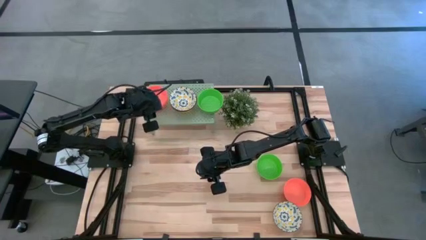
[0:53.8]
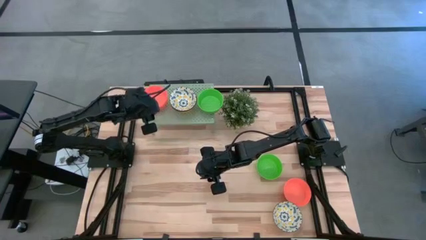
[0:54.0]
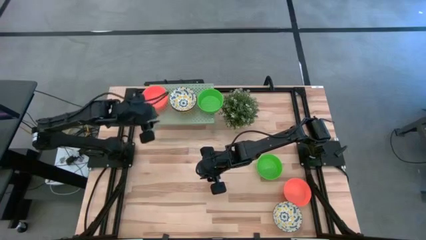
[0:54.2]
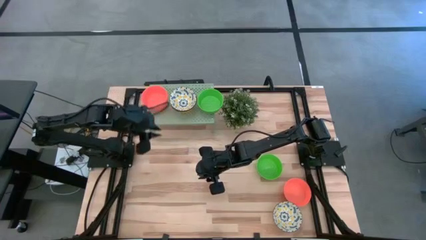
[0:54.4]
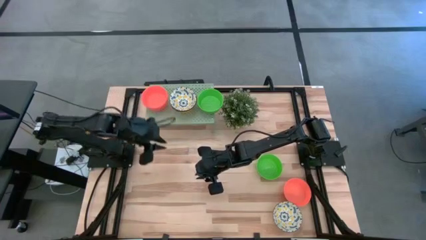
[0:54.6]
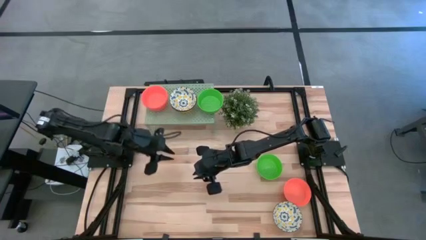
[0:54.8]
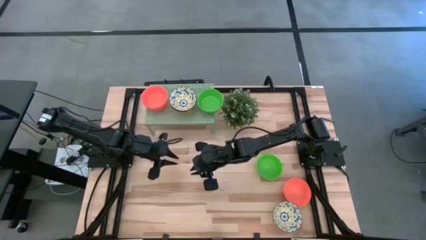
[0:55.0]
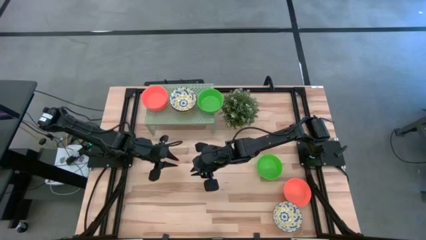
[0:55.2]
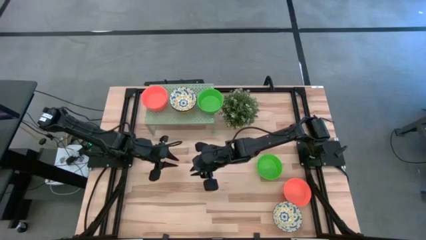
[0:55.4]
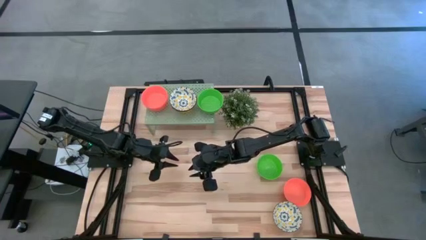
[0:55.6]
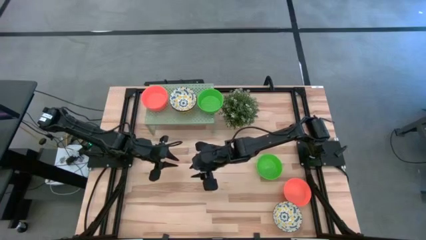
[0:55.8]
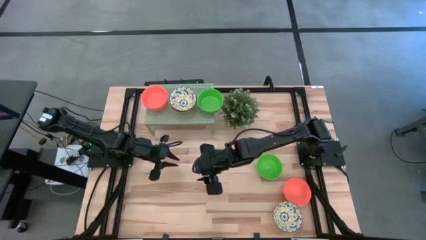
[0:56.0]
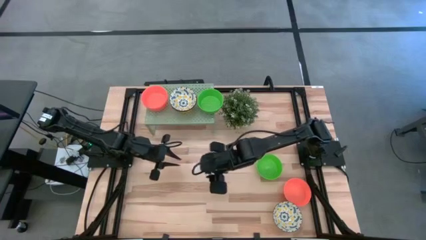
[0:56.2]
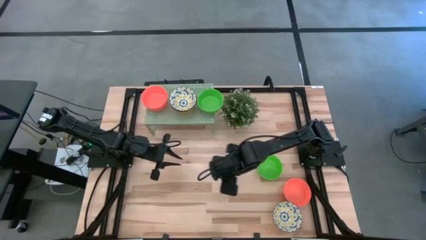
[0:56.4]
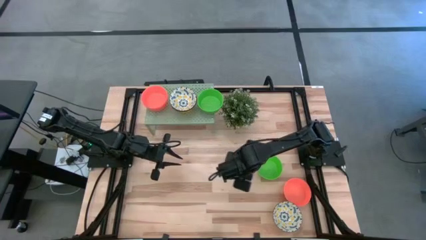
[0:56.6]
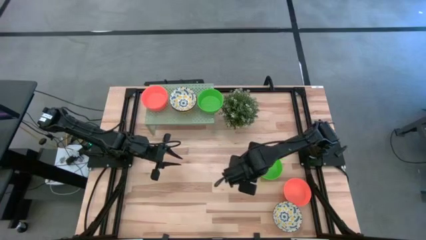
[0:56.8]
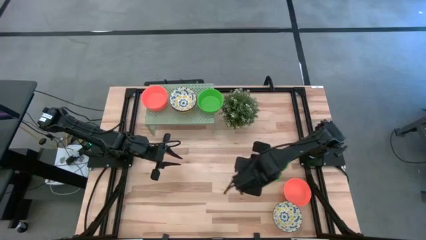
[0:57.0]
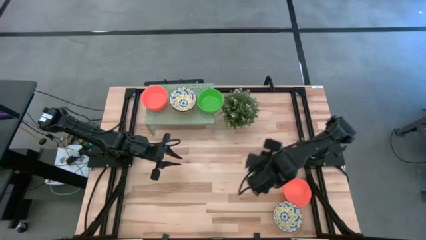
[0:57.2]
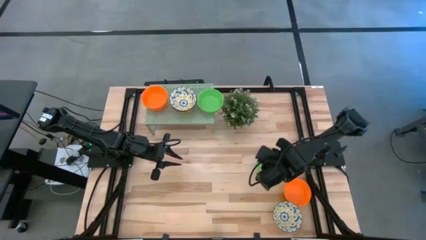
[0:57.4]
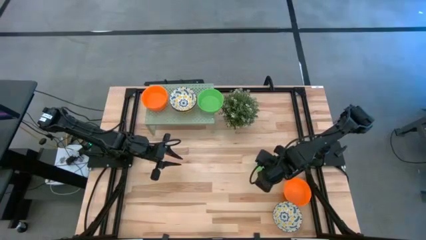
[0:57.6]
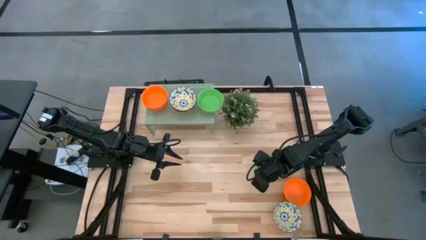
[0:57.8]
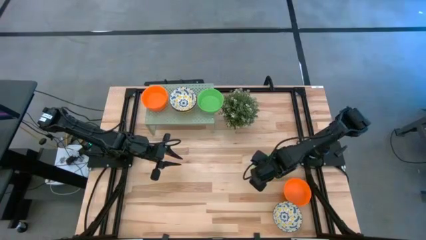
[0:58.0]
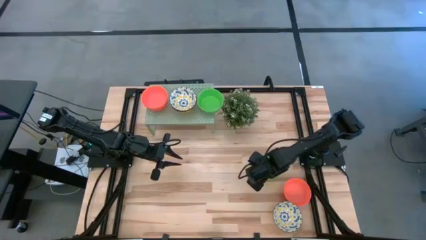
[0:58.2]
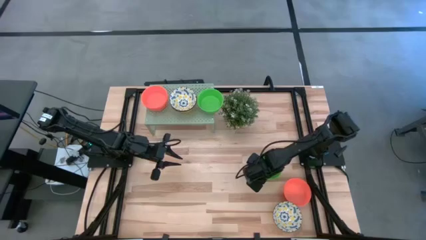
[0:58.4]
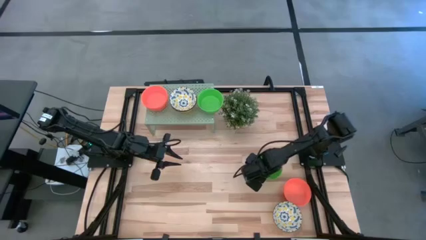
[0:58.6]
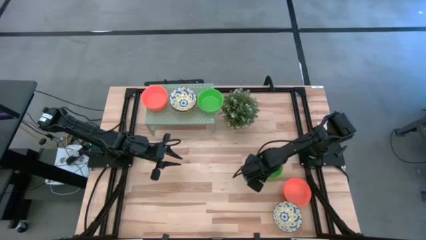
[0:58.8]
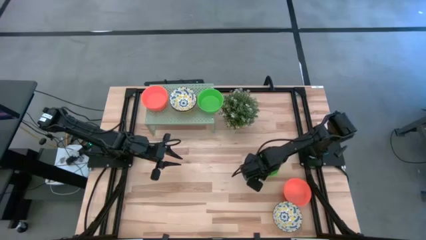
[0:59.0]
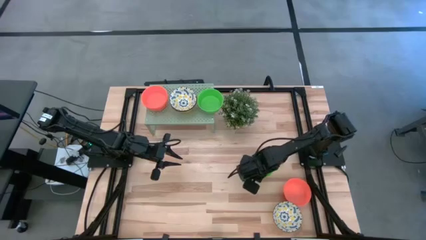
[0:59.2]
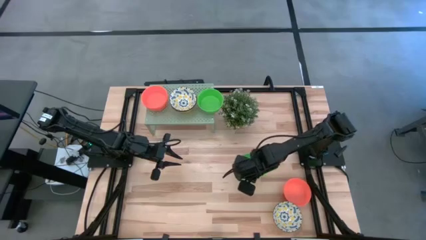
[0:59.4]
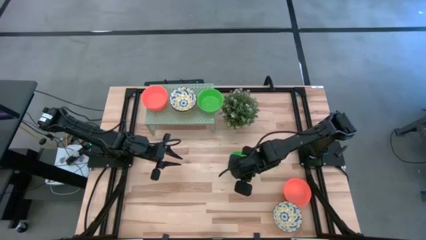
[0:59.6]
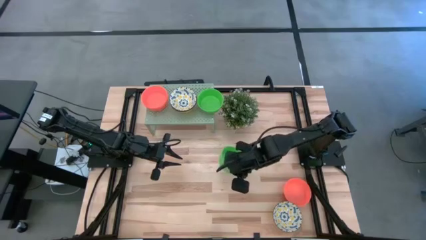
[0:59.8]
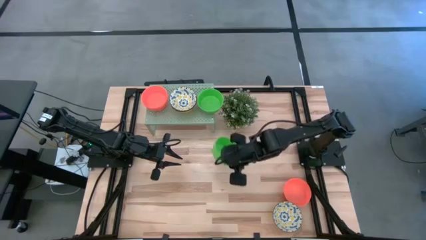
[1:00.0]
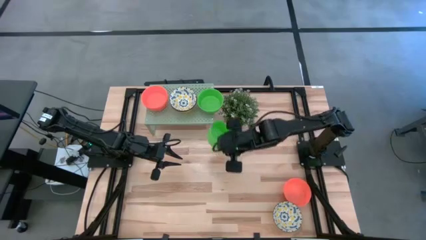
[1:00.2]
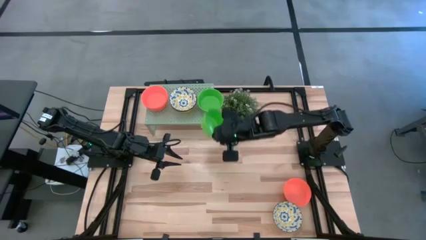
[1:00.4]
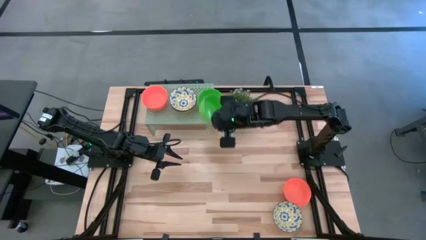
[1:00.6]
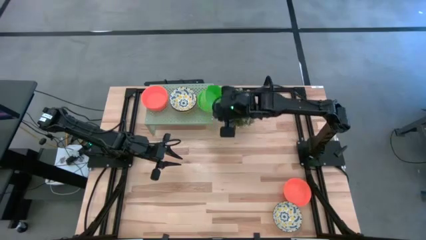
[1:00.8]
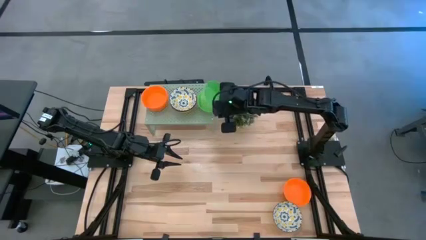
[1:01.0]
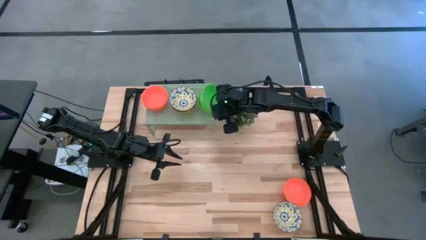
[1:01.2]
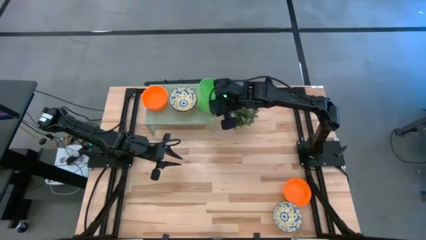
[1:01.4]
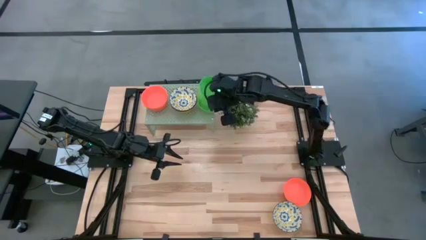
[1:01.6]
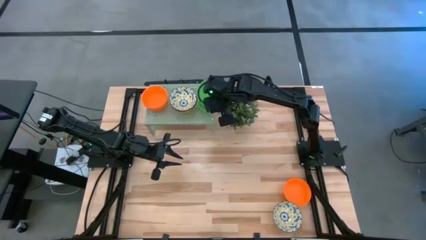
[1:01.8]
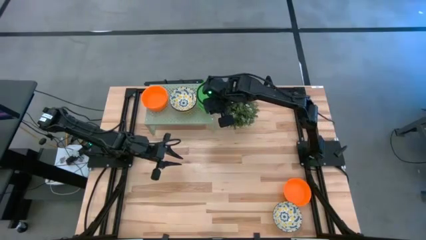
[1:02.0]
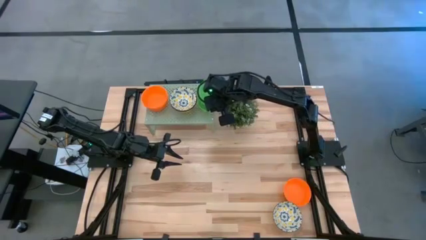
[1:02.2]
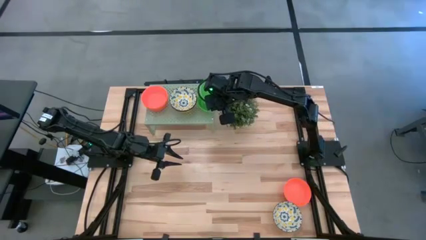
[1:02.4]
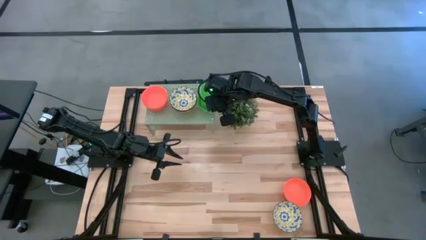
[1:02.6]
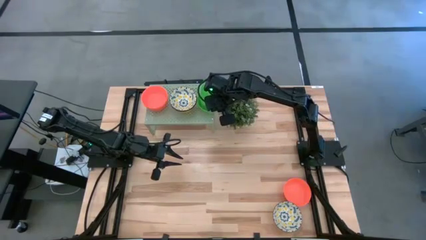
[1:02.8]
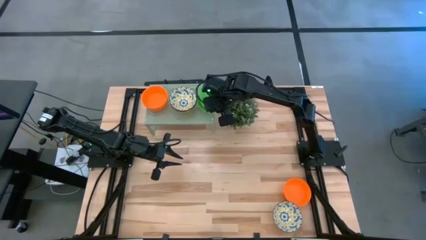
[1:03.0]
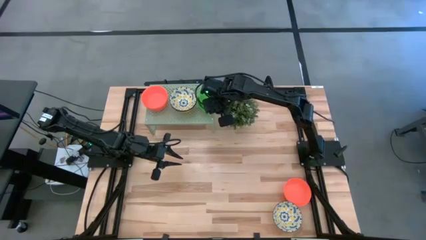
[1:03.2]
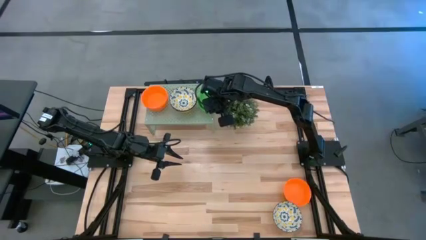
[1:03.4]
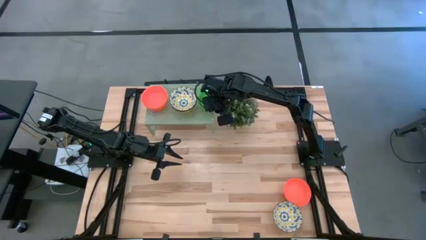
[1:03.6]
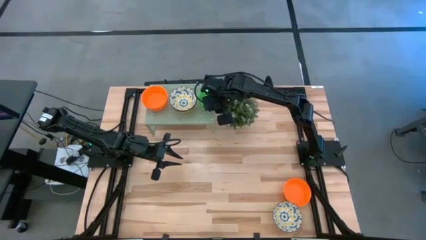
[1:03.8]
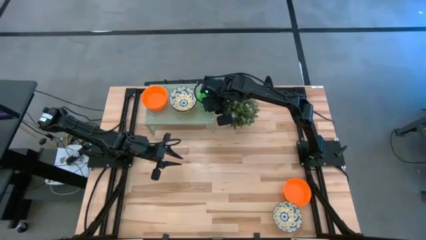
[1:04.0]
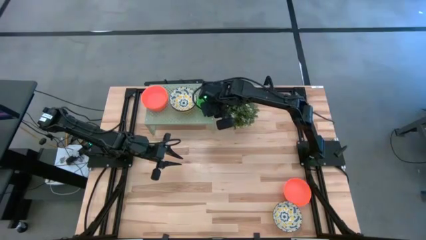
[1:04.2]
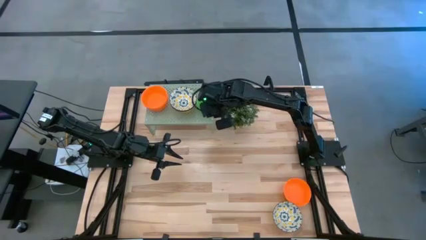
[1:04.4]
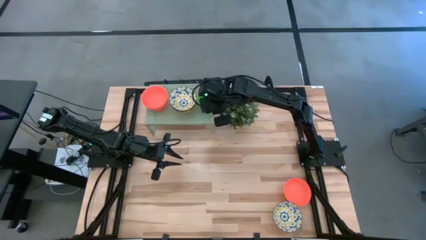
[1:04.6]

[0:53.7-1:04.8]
Task: Pick & Place Mini bowls
Stack the green bowl on top of the stacked green bowl on the shelf

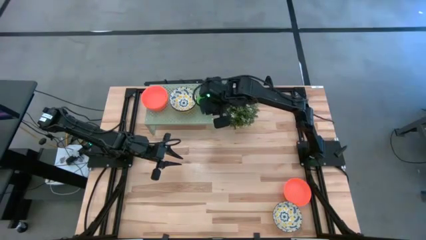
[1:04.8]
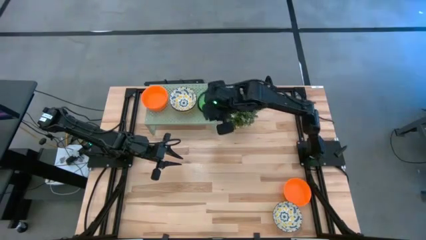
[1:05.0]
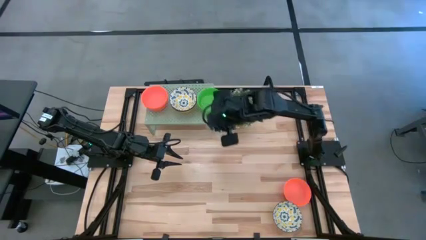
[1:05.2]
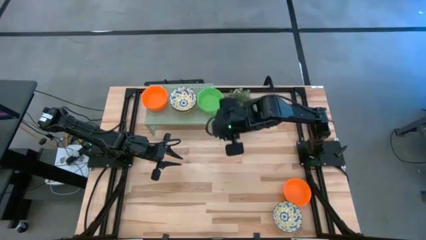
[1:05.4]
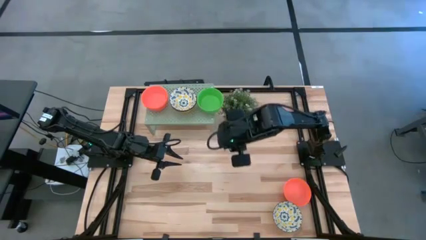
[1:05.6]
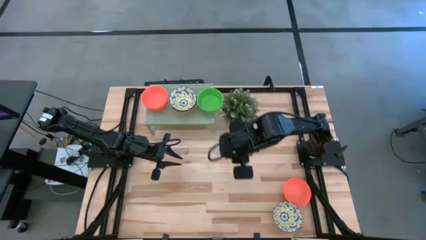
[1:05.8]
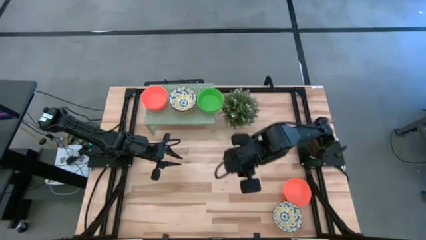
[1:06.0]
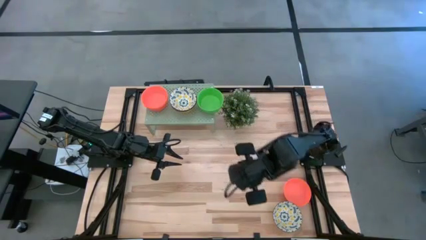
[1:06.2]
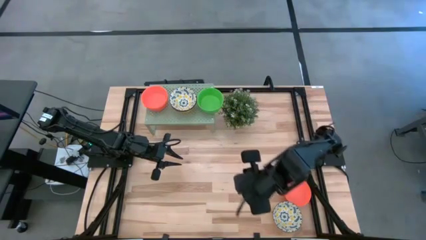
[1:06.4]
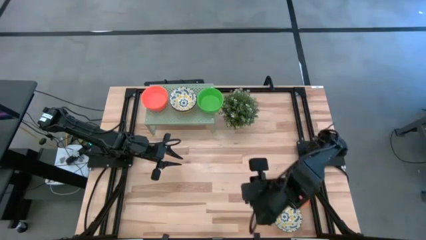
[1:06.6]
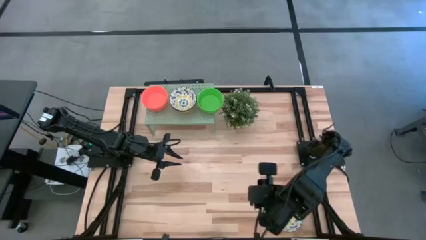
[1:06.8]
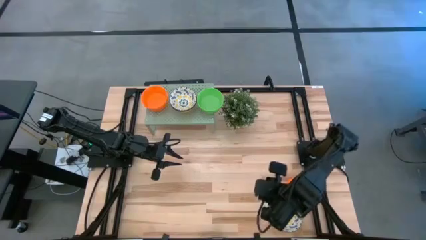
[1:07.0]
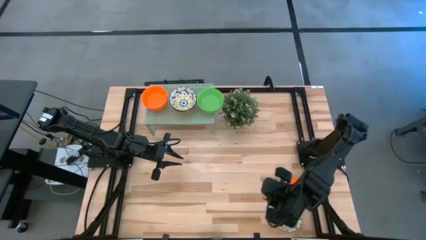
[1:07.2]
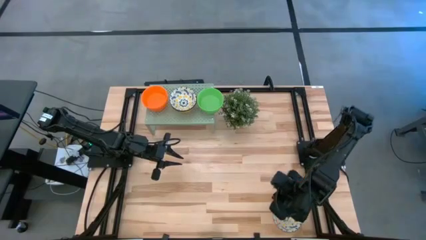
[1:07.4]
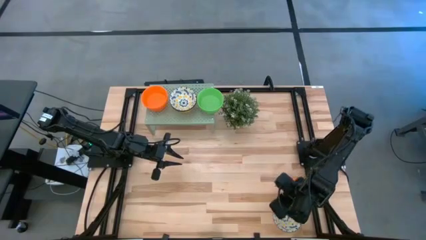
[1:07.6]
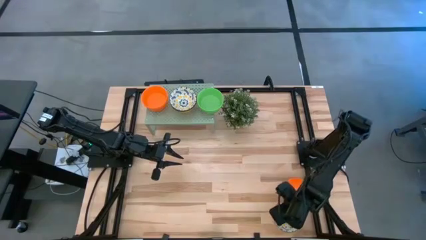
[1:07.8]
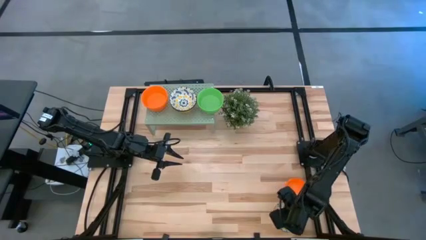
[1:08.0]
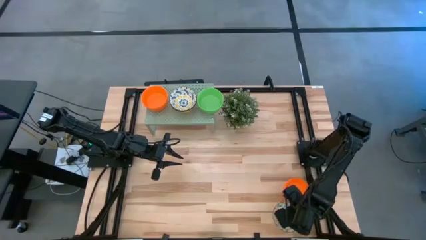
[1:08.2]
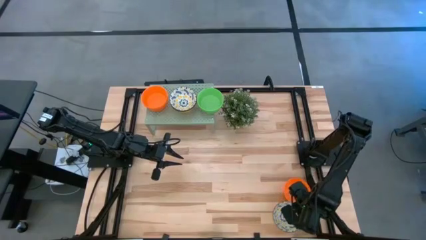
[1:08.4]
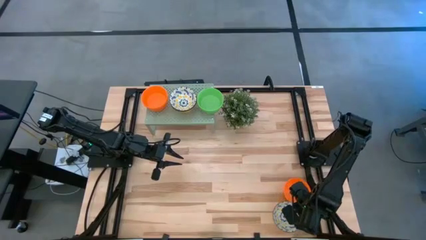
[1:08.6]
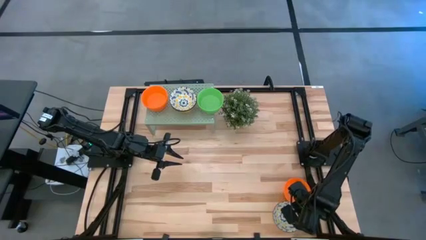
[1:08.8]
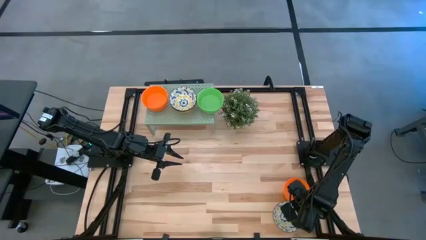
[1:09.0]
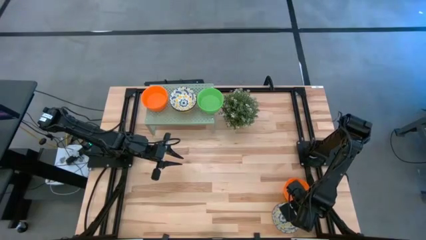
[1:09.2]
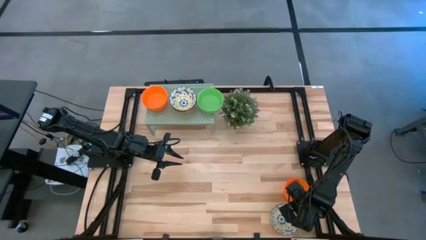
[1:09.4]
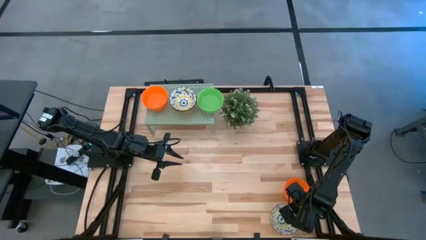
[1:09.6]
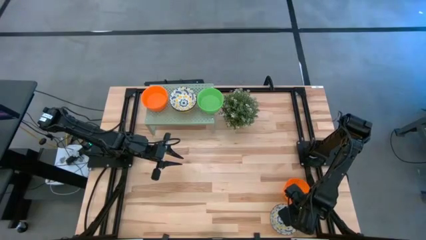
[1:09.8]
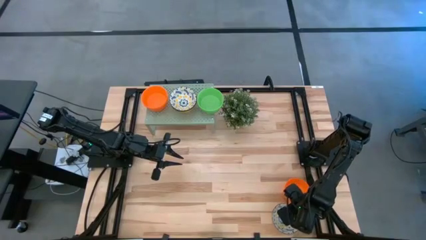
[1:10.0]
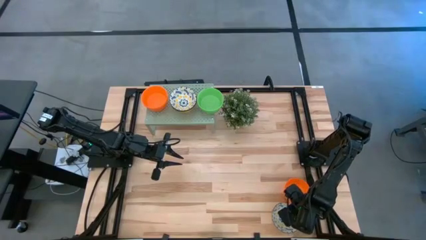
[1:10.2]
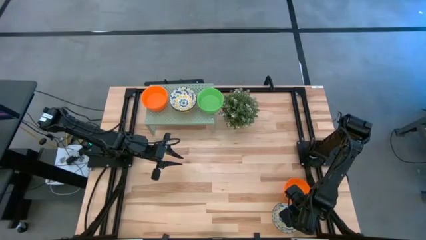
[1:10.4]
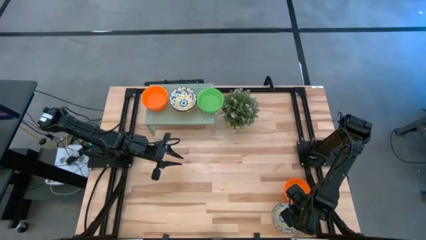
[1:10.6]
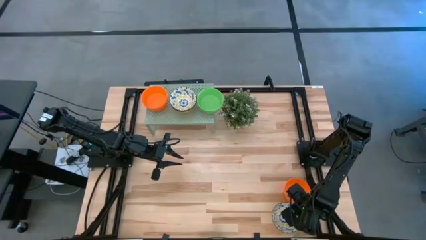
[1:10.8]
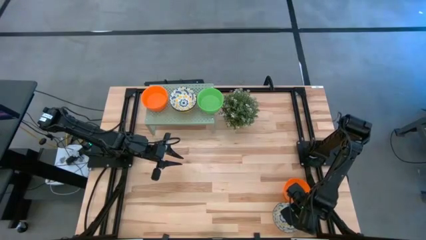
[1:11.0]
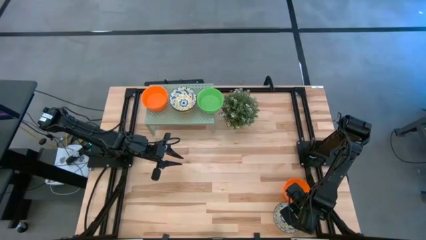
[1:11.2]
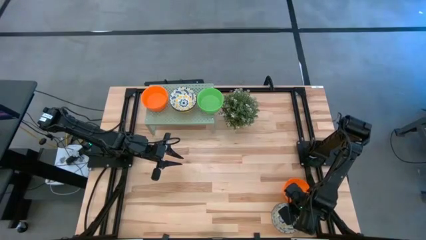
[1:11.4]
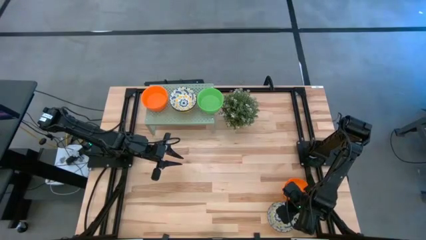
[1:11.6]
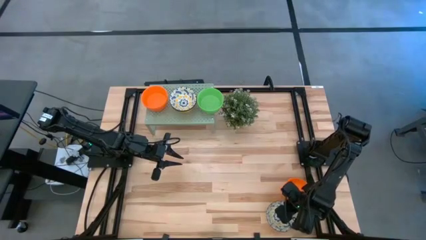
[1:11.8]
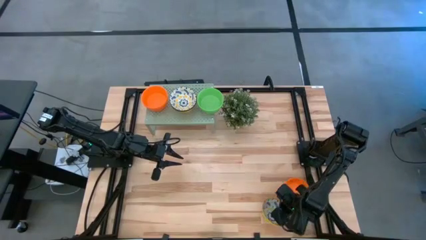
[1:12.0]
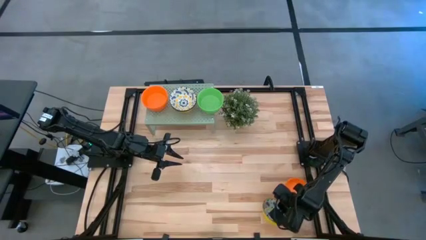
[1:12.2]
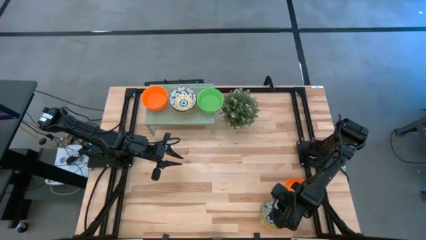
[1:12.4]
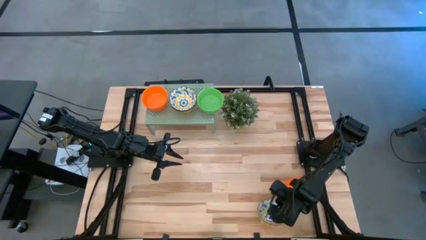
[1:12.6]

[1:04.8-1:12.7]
Stack the white pattern bowl on top of the stacked white pattern bowl on the shelf
